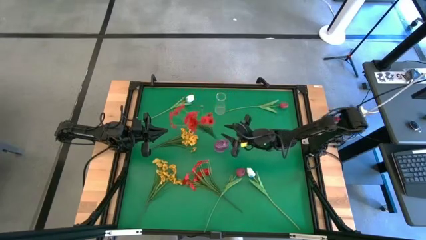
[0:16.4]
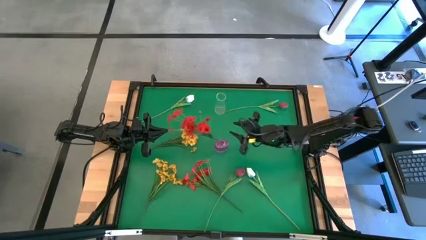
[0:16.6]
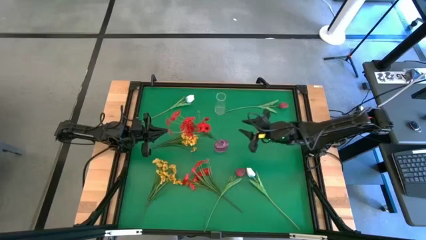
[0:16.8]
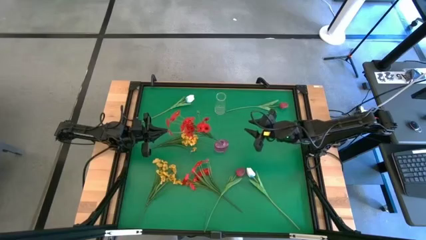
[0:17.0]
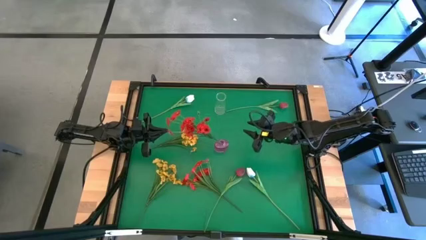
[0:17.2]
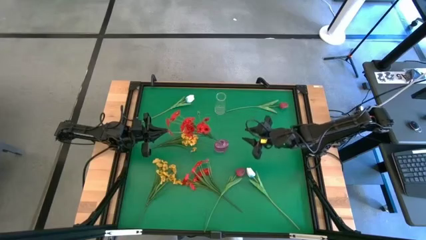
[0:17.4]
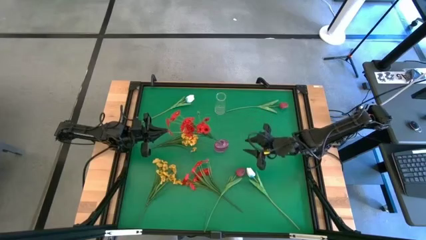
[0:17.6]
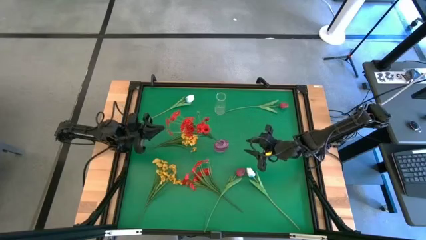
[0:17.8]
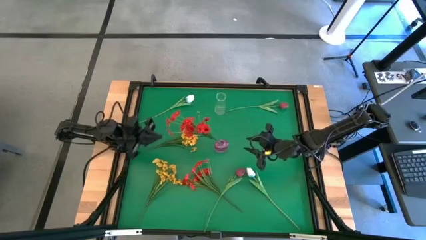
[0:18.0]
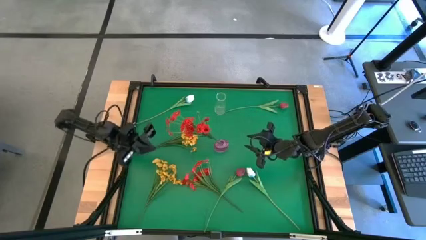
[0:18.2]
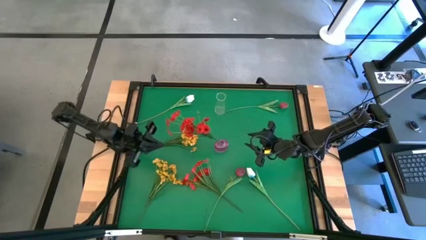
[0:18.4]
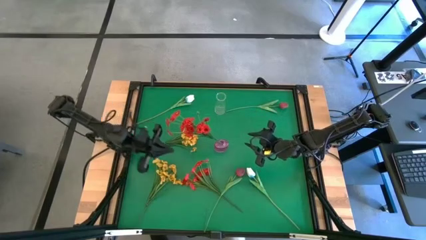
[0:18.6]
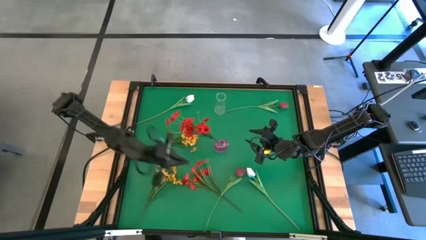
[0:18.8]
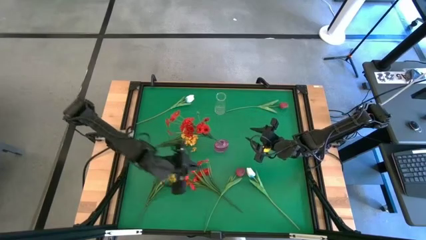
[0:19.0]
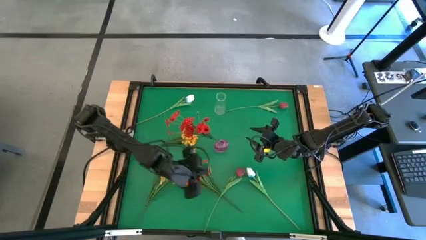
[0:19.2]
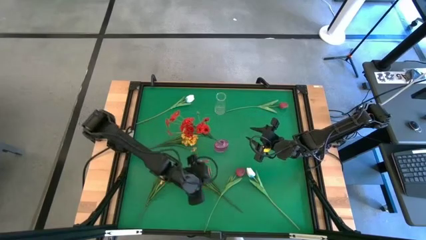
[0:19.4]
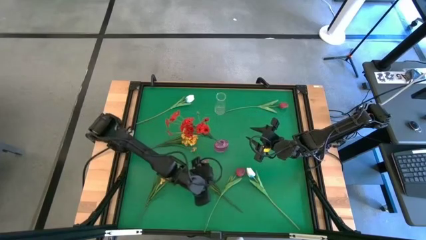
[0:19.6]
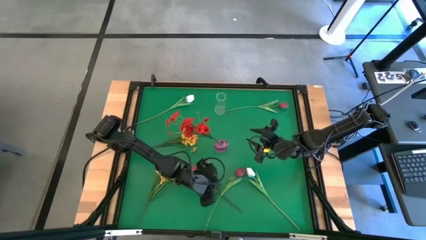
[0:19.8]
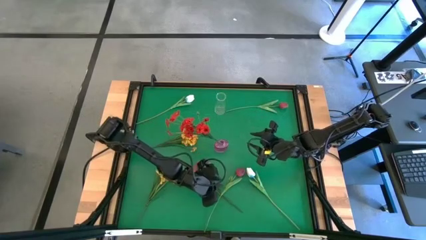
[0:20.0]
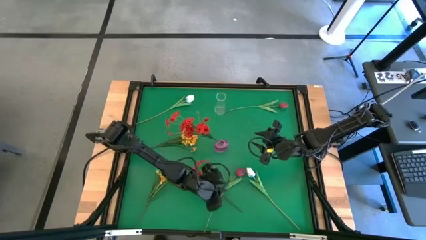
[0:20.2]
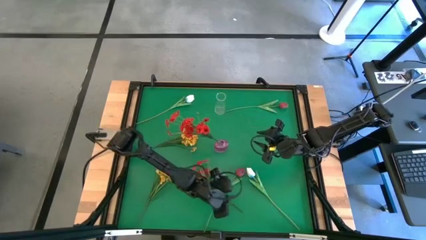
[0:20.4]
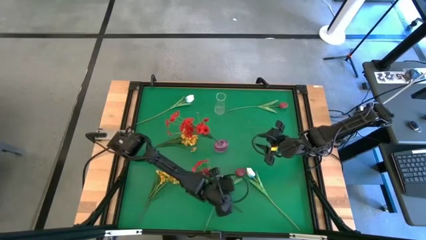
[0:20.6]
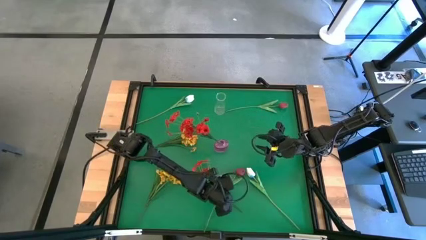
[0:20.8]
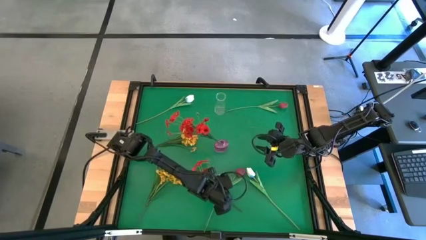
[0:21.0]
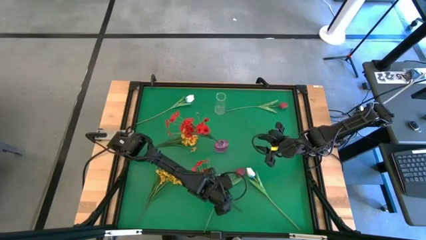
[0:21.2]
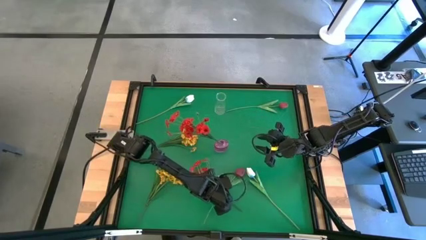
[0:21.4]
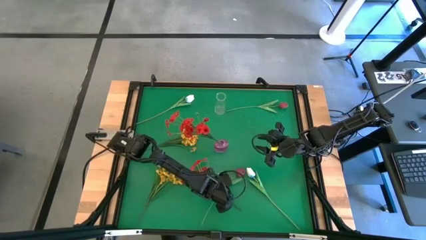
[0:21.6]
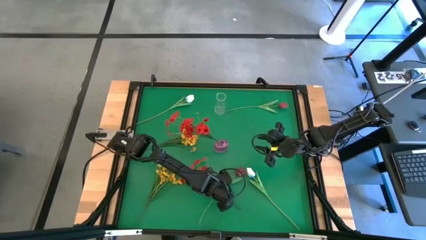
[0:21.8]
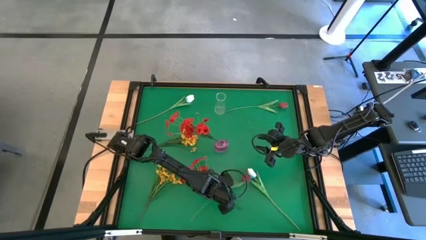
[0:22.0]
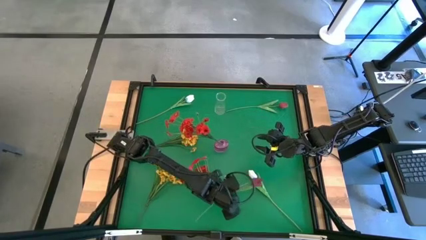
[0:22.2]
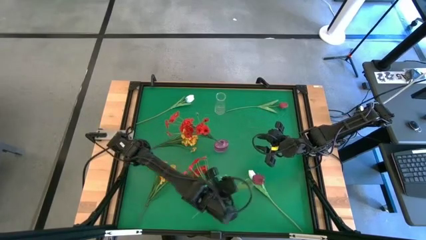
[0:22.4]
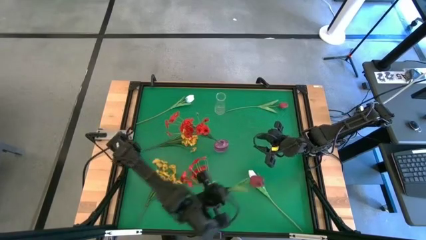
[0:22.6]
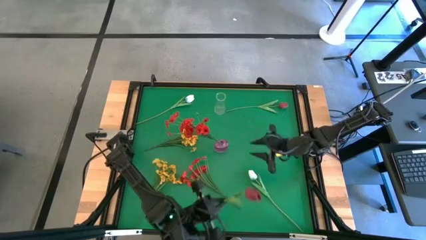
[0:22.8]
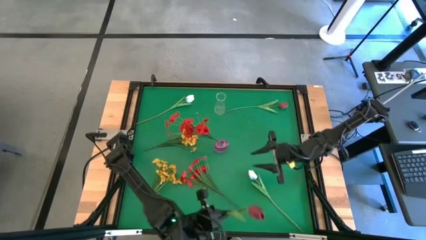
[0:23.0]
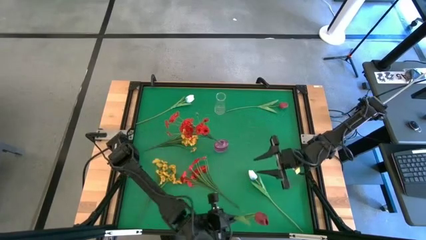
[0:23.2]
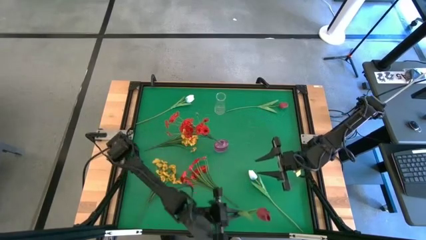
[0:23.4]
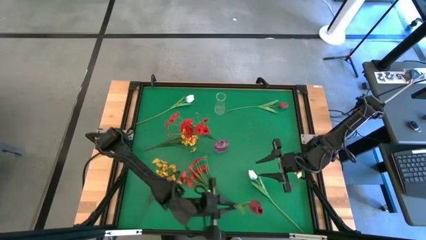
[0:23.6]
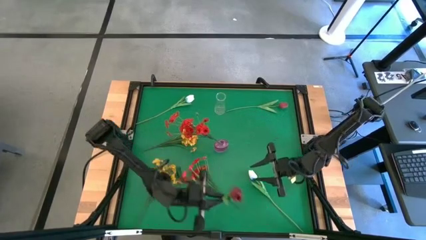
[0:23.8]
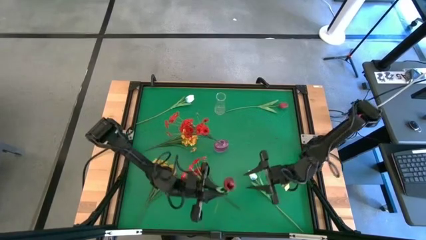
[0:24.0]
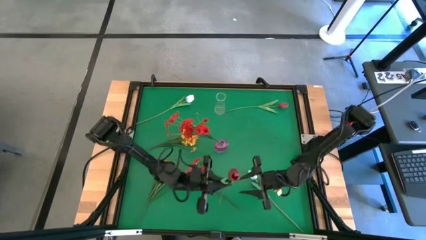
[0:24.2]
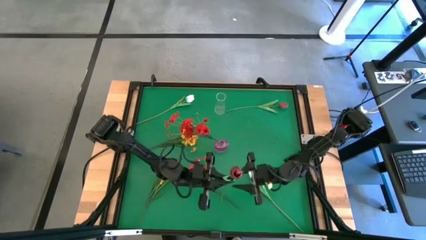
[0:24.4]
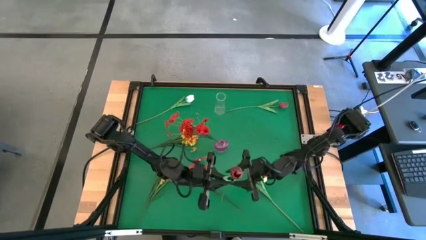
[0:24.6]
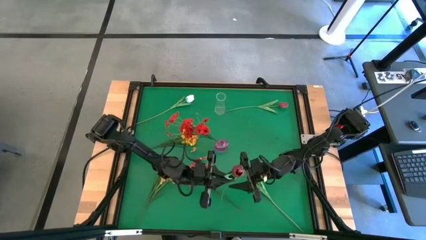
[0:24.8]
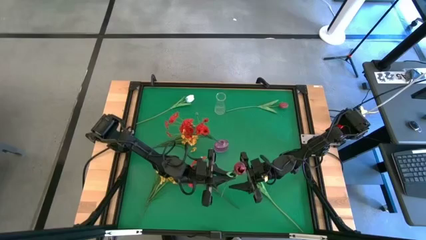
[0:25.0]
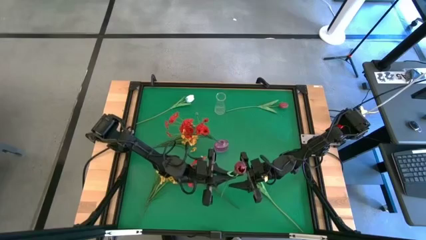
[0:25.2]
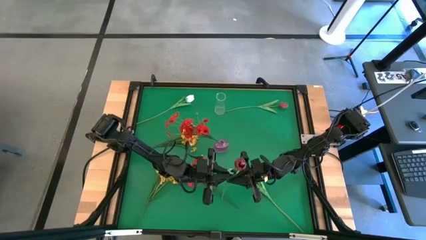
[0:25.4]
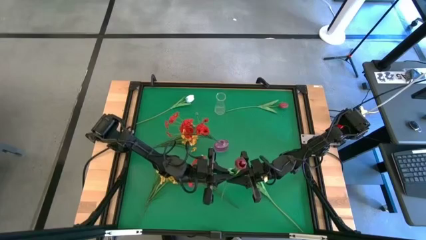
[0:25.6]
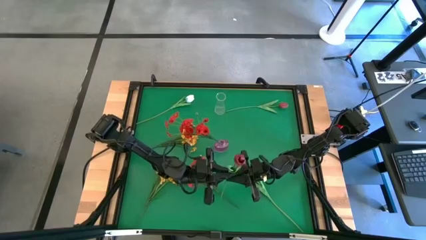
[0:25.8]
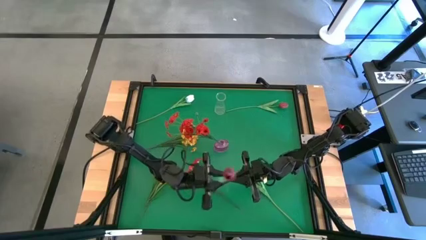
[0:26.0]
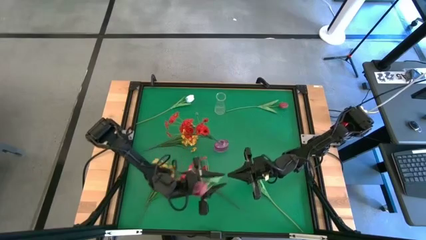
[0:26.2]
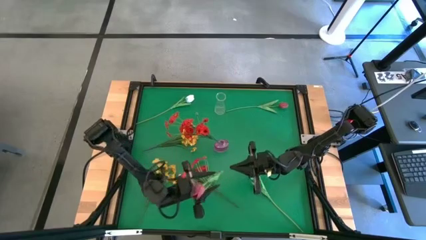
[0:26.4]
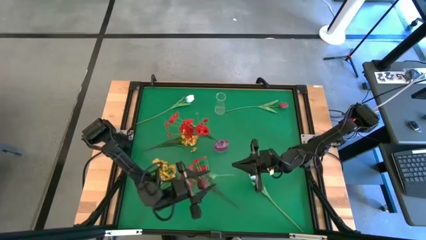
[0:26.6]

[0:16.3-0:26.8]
Task: Sort flowers into vase by color
Put the bottom red flower into the pink vase

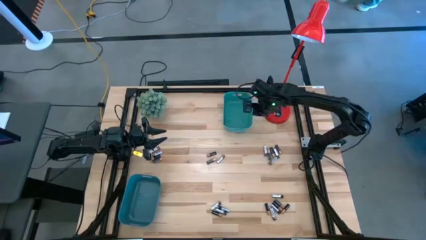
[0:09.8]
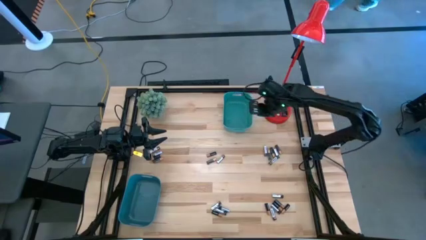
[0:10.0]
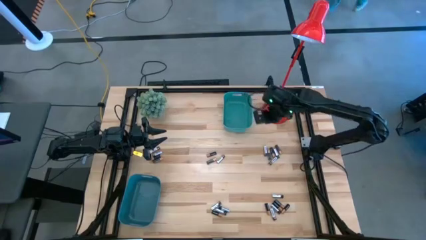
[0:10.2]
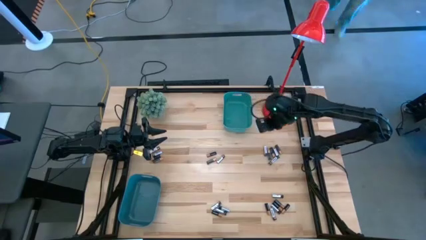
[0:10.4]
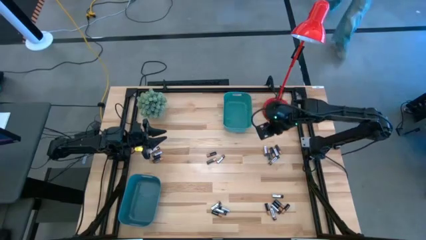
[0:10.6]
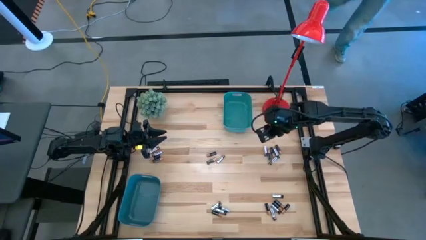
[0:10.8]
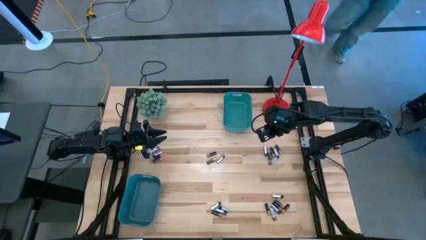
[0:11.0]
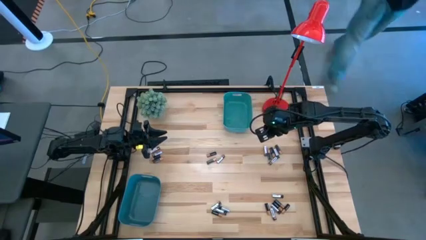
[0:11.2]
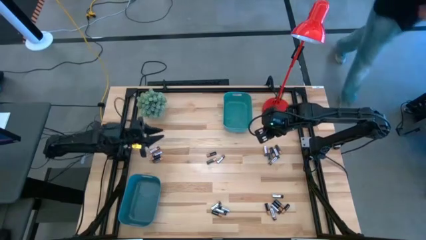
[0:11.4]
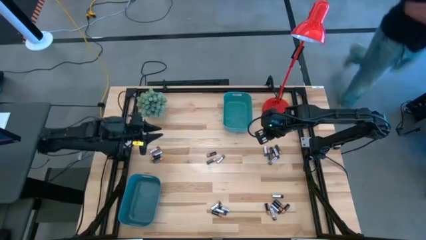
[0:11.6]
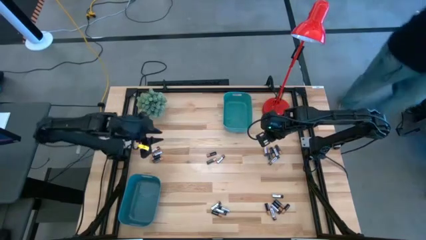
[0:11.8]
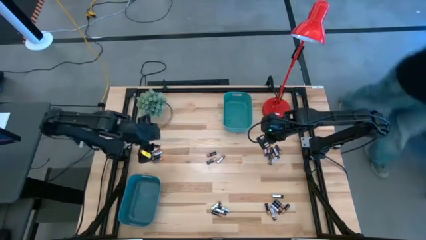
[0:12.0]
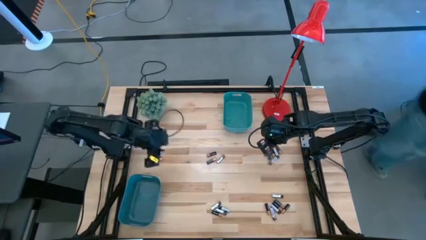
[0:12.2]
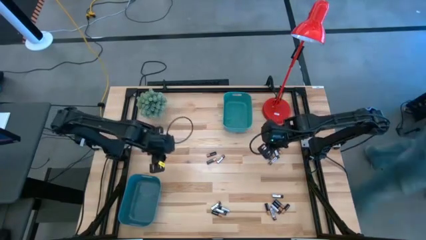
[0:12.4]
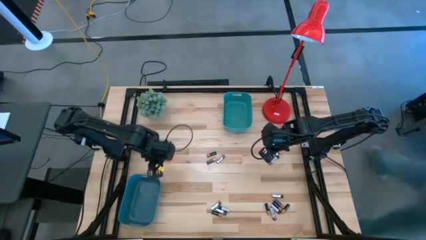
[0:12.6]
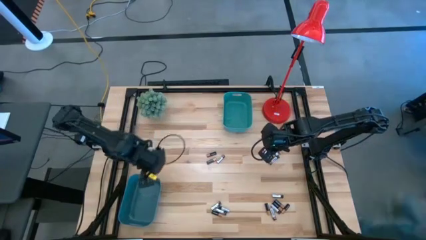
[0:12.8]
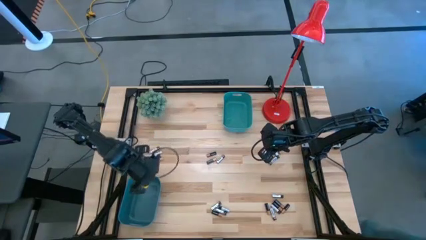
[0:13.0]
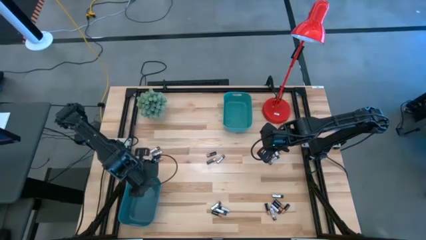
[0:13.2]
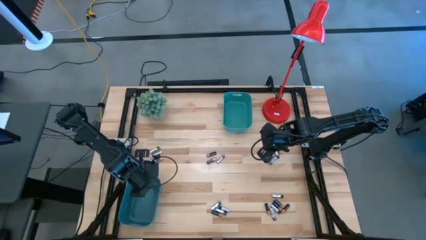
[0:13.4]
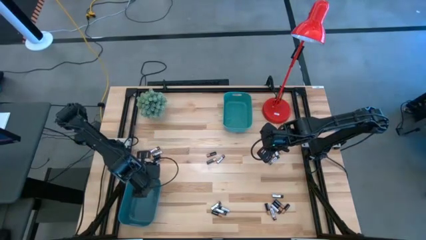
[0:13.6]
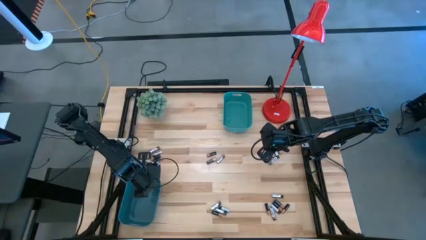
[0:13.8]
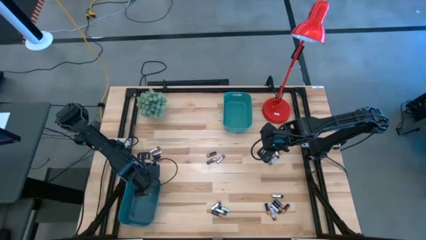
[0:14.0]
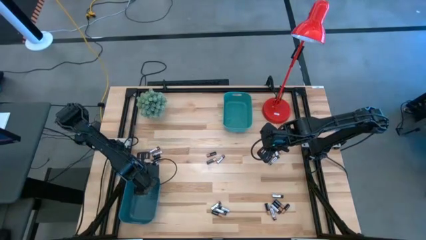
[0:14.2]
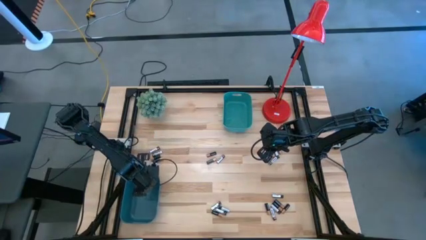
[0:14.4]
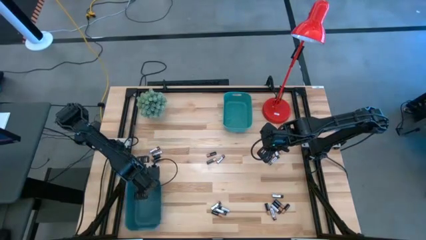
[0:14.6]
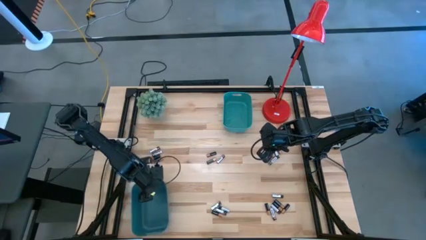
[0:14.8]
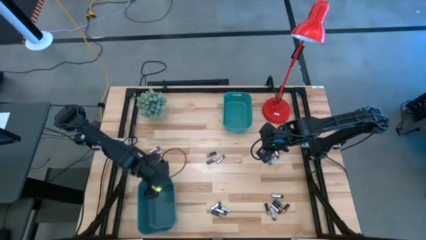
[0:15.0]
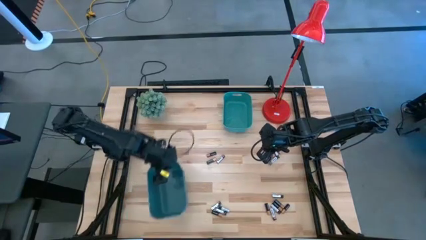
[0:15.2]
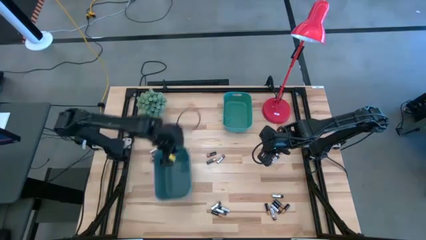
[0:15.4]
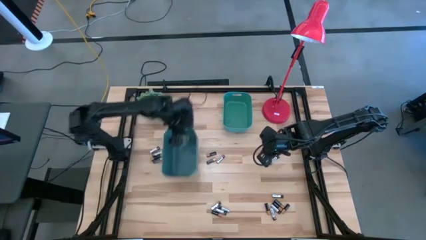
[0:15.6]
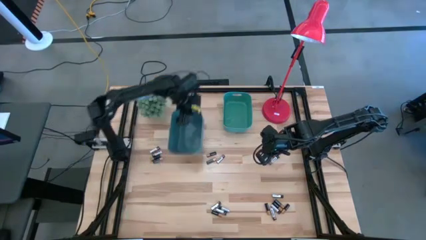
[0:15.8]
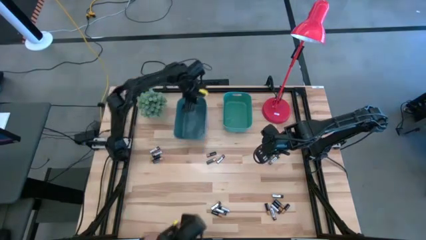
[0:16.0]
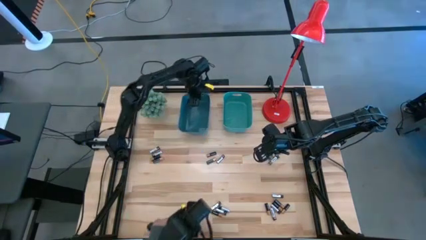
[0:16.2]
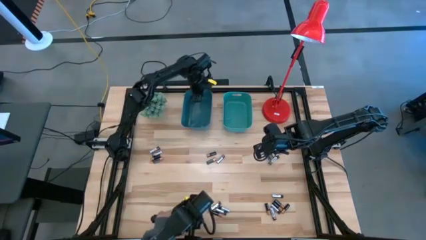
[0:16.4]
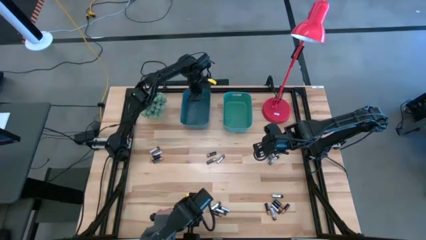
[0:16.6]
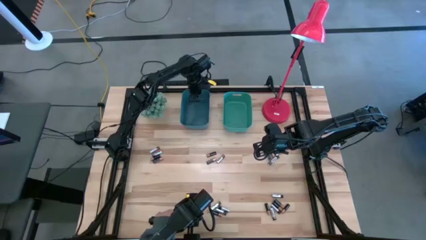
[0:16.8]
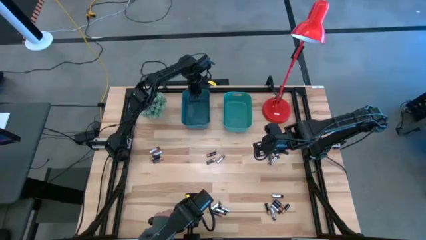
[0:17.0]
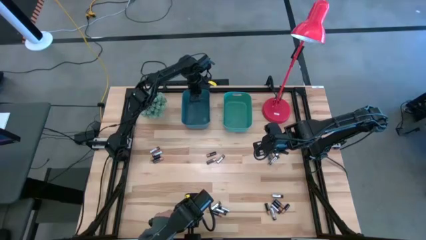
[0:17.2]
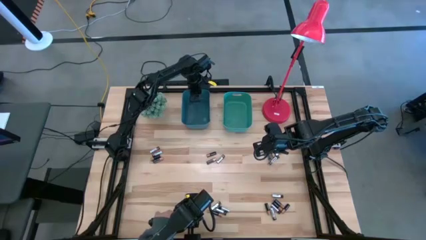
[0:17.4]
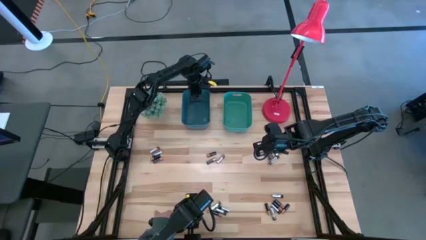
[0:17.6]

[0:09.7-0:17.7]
Task: Sort batteries
Move the blue bin to the top of the table
